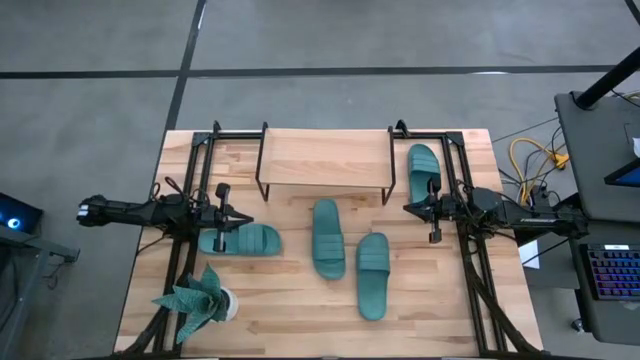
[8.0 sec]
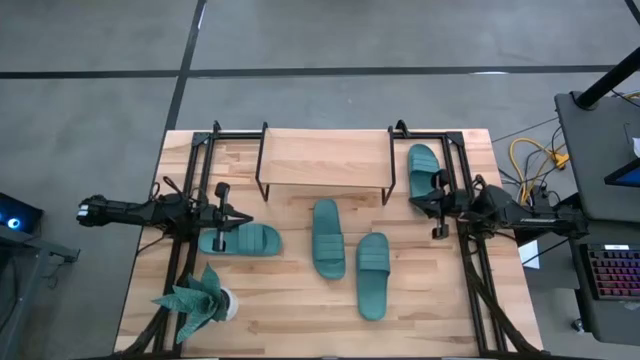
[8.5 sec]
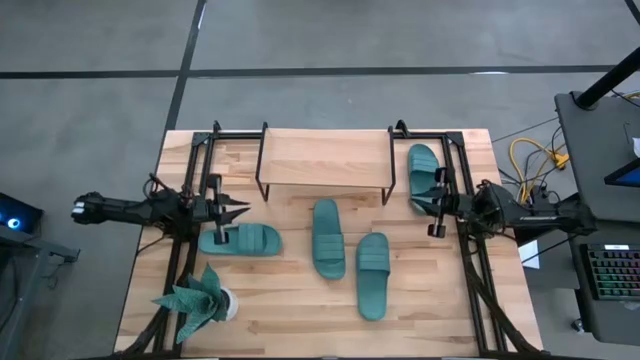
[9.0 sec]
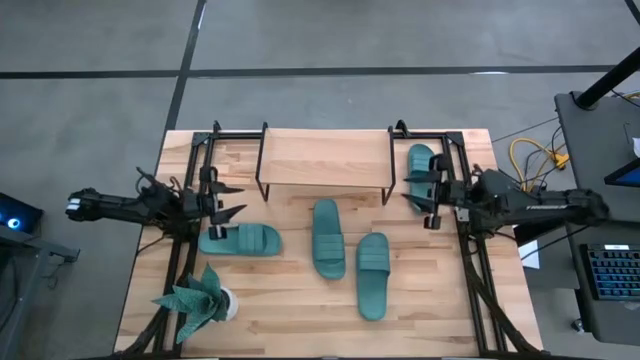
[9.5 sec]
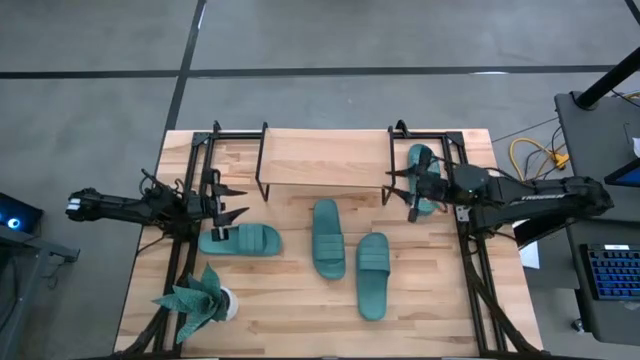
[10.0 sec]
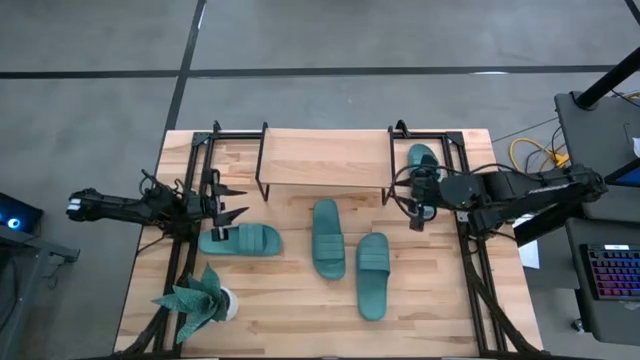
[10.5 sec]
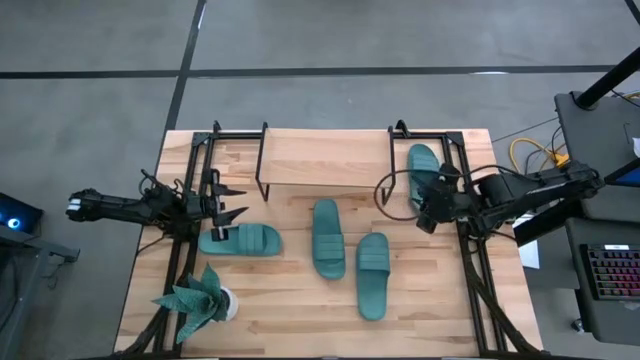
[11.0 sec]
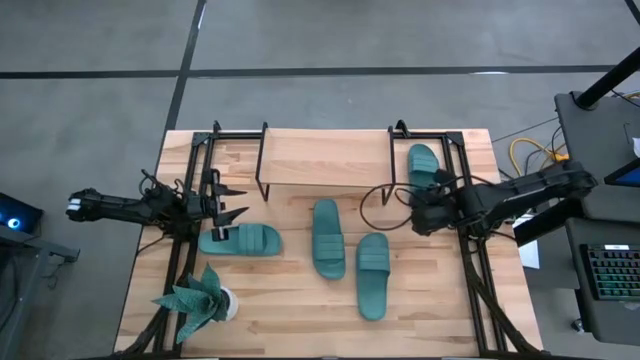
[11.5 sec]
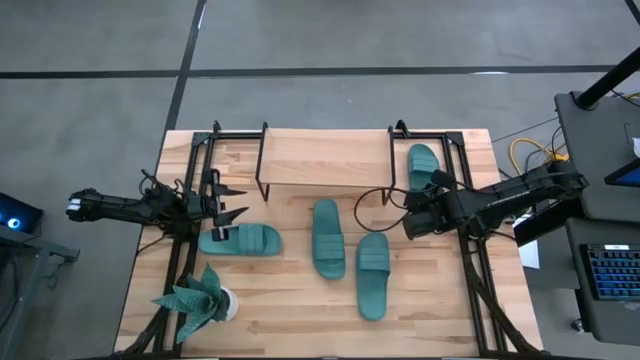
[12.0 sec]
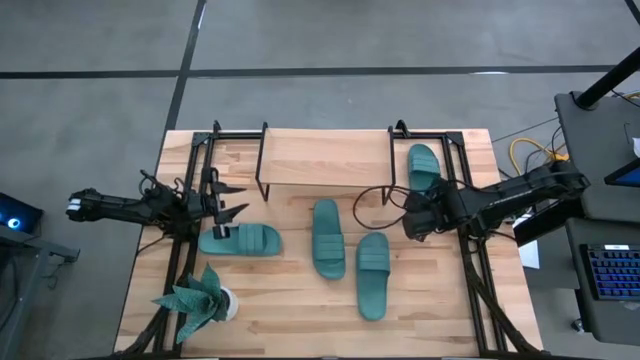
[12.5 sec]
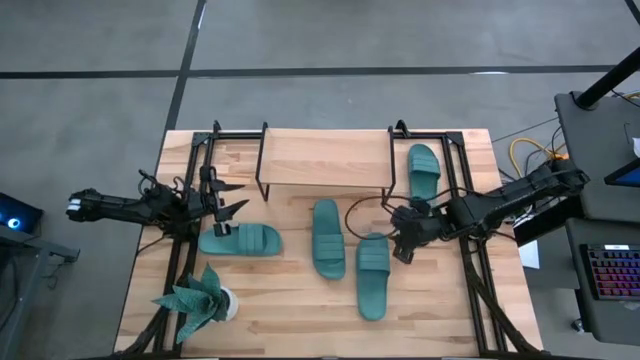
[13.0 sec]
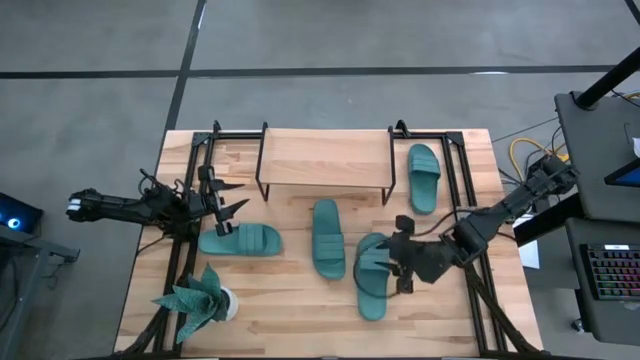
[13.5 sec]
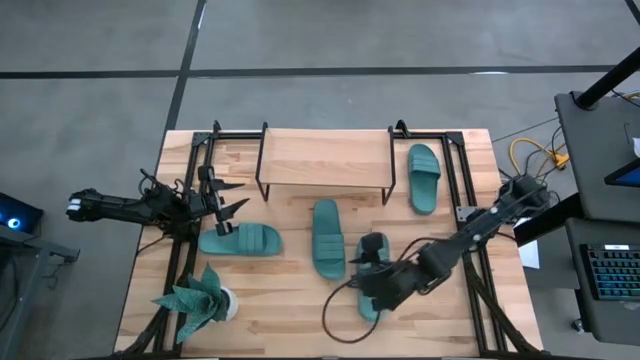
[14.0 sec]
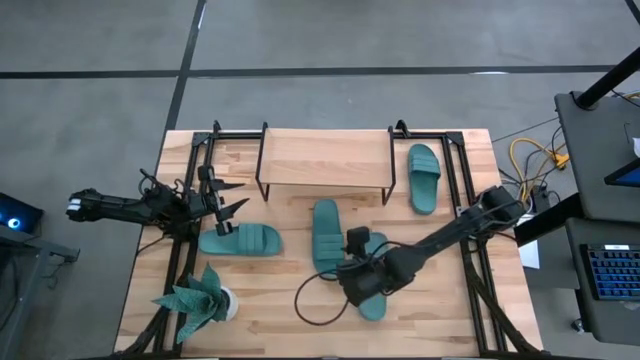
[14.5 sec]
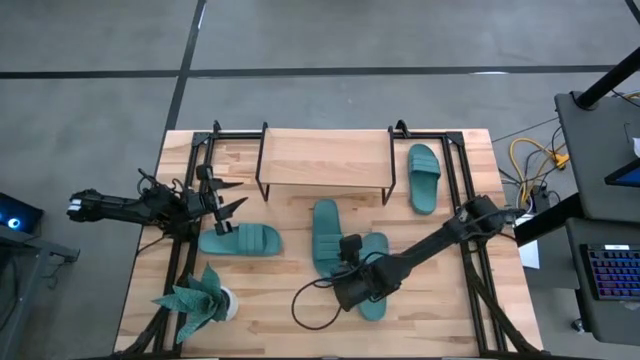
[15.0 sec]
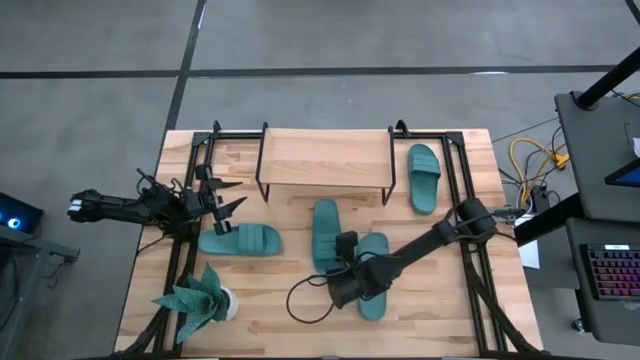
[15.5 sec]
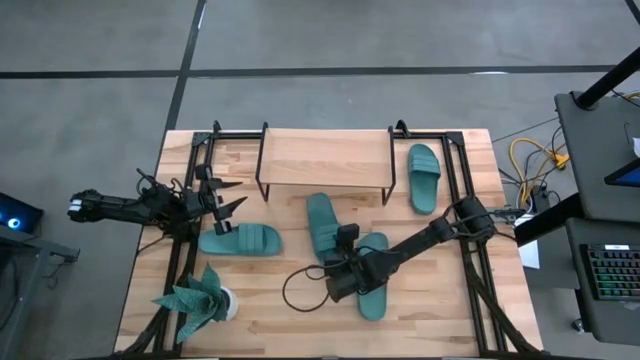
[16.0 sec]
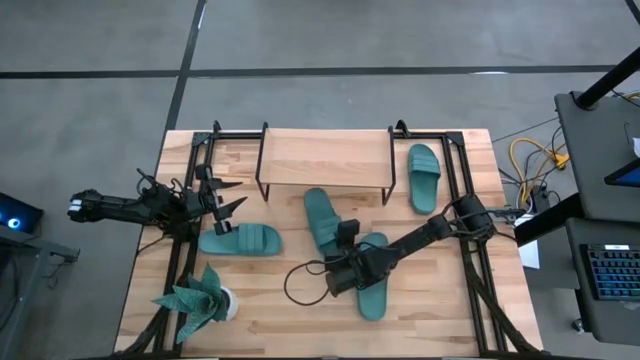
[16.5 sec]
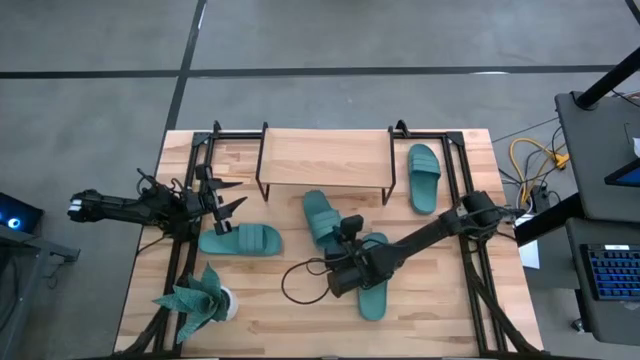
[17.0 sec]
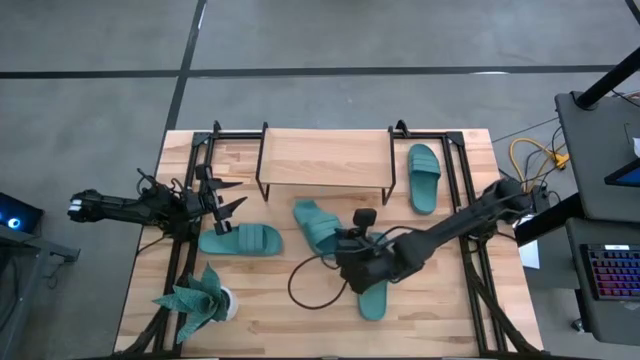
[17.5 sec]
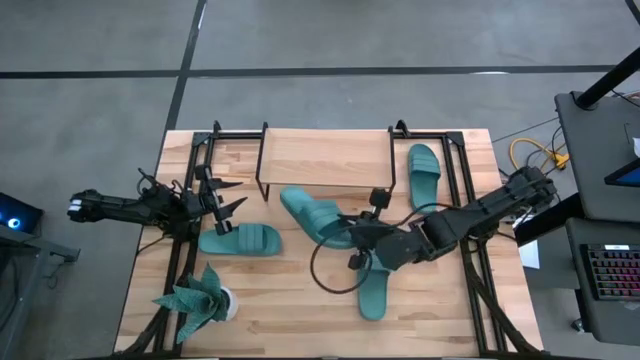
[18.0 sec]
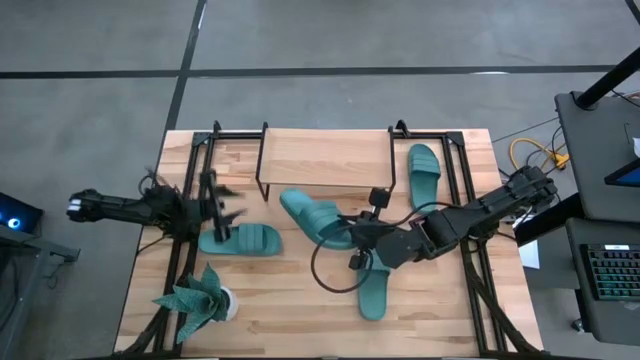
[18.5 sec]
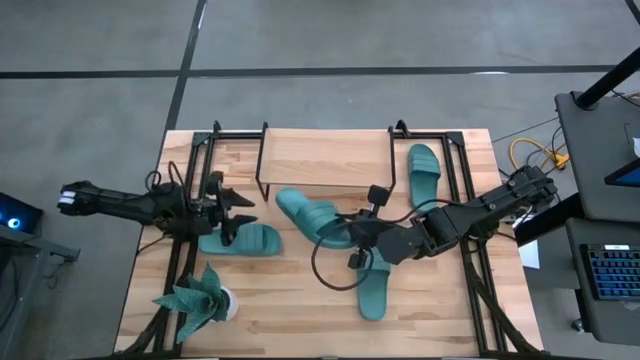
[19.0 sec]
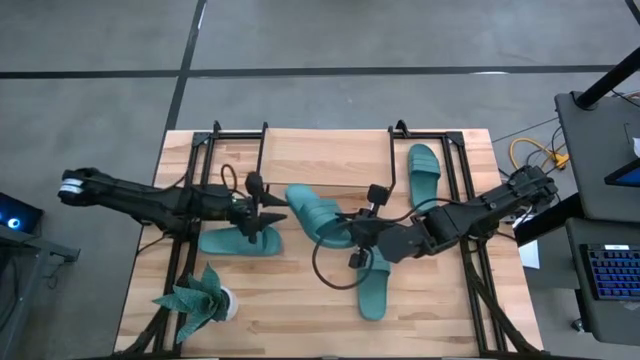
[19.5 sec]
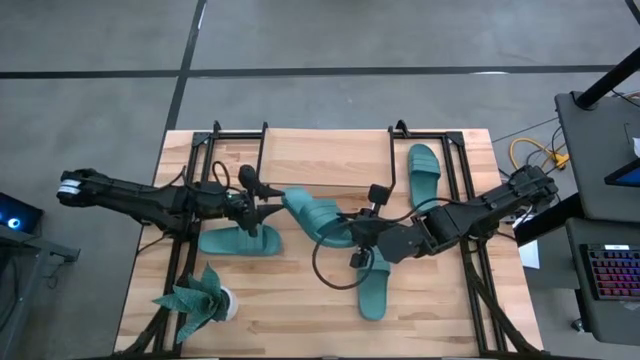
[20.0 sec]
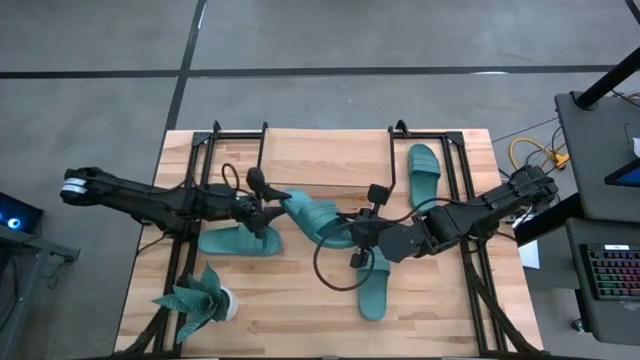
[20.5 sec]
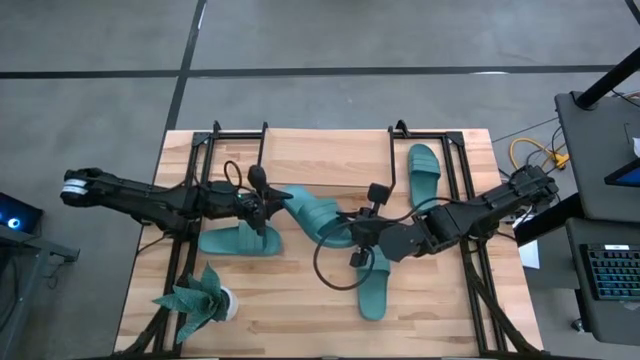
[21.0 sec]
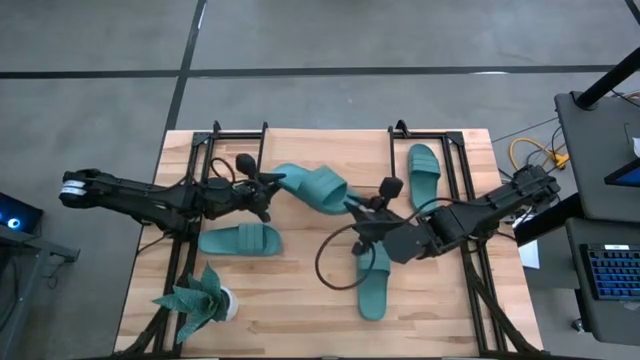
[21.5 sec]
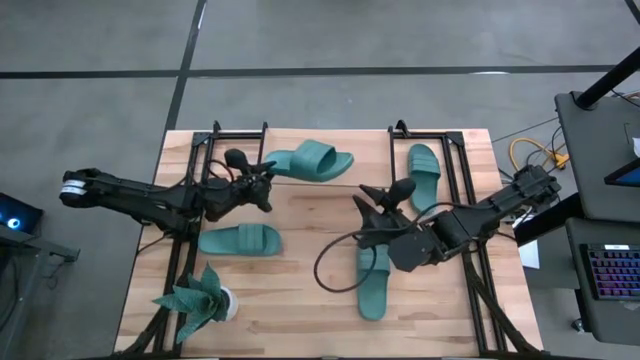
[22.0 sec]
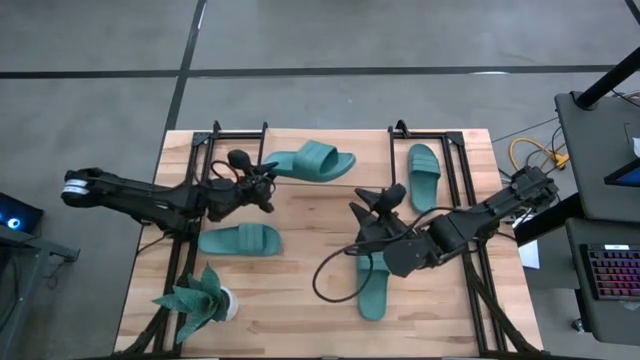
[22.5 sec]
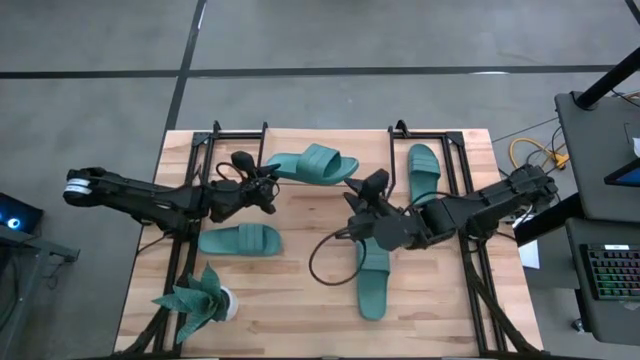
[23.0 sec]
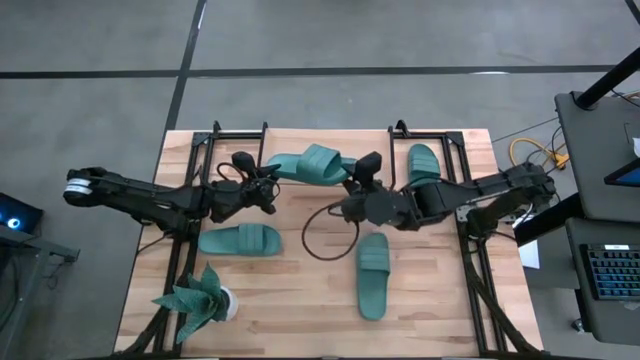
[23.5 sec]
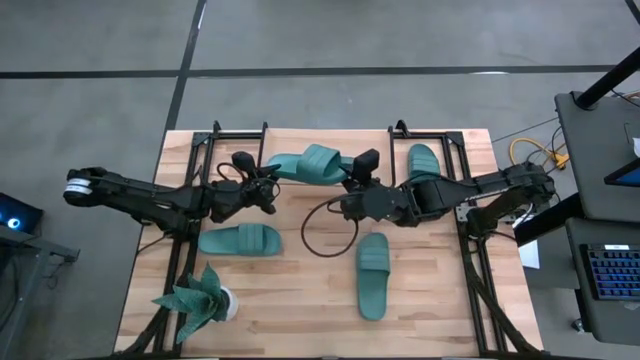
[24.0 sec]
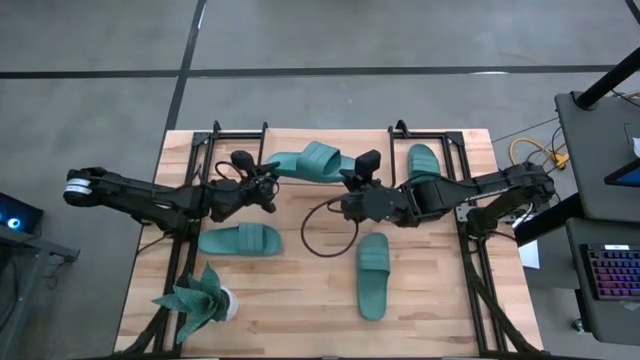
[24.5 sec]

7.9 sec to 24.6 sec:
Task: Pick and place slides into the shelf
Put the green slide on the shelf

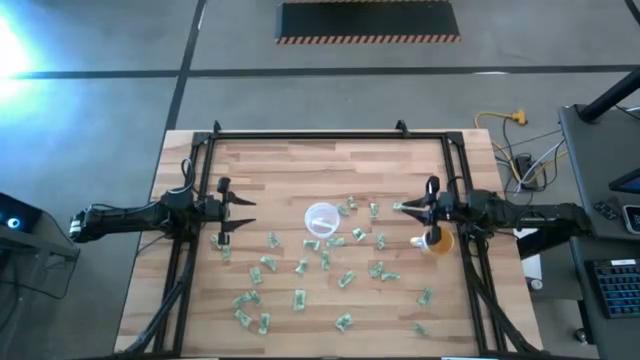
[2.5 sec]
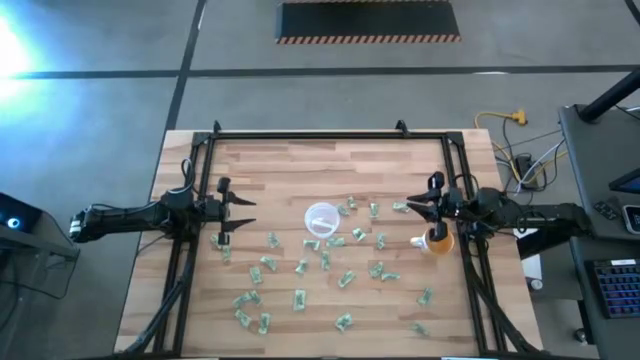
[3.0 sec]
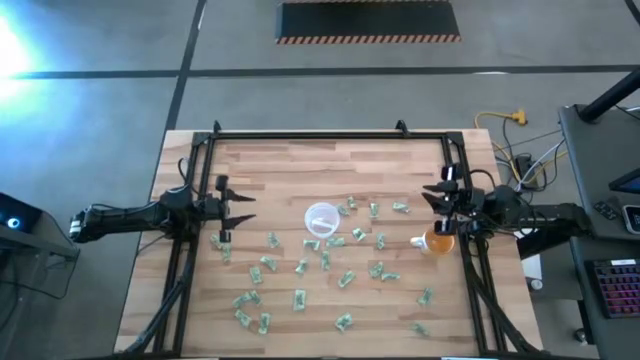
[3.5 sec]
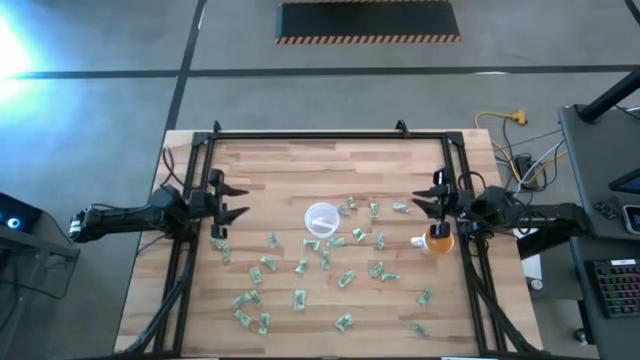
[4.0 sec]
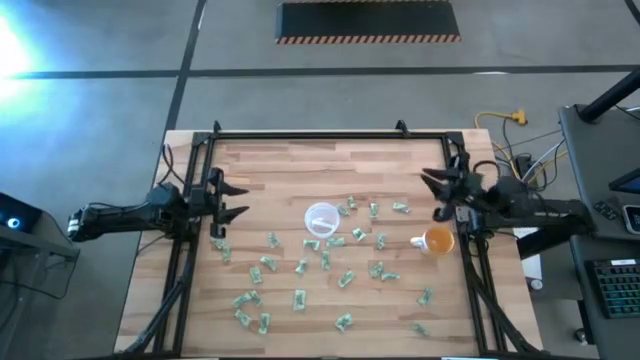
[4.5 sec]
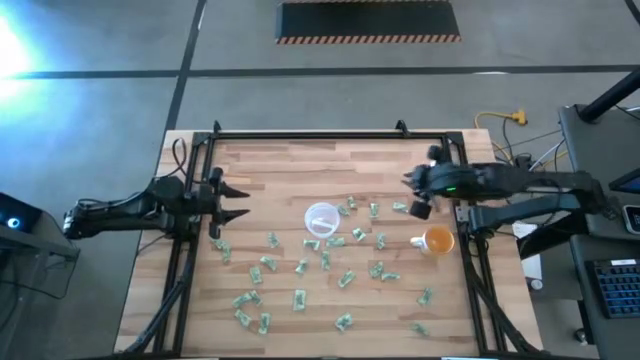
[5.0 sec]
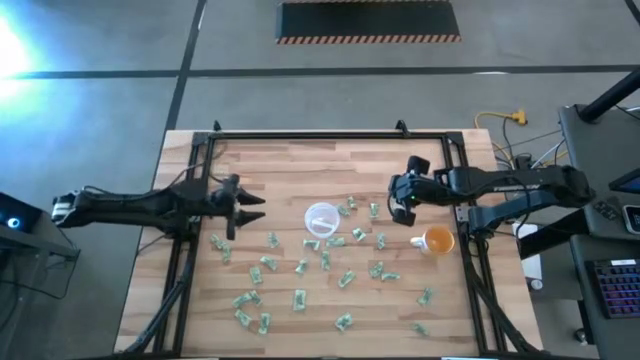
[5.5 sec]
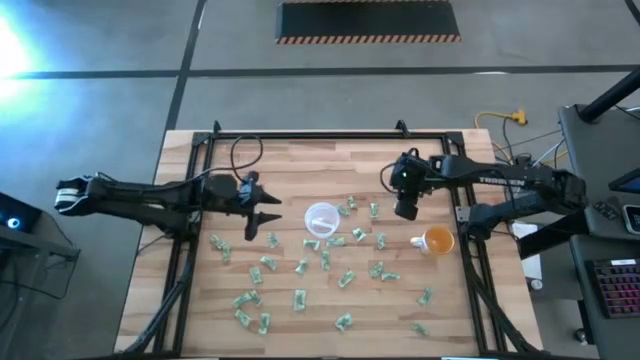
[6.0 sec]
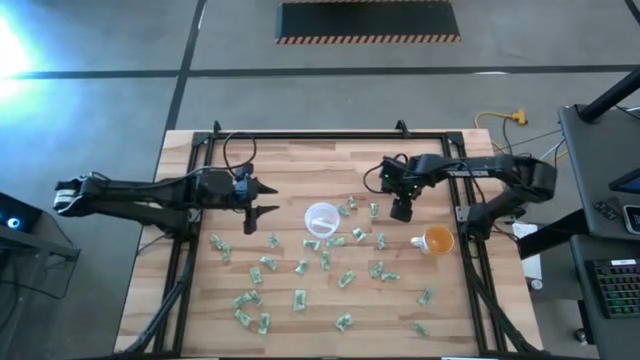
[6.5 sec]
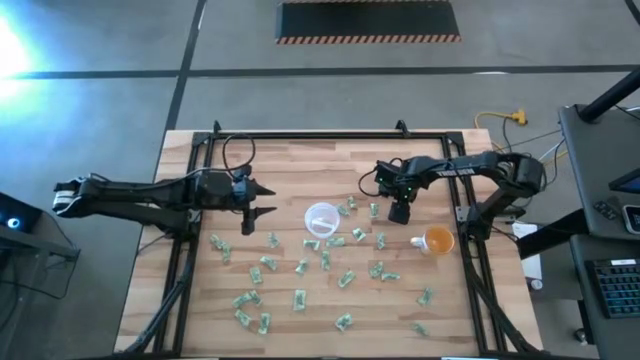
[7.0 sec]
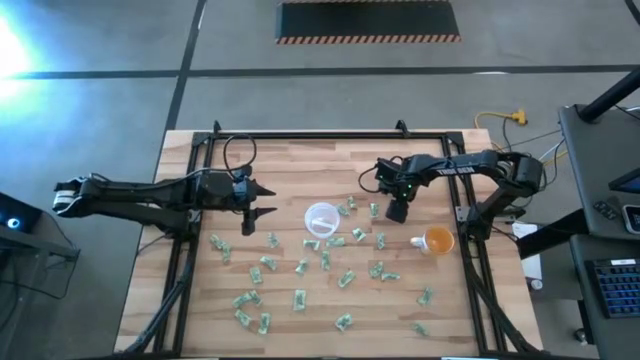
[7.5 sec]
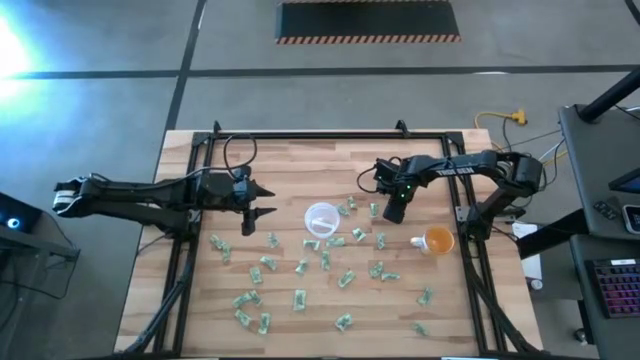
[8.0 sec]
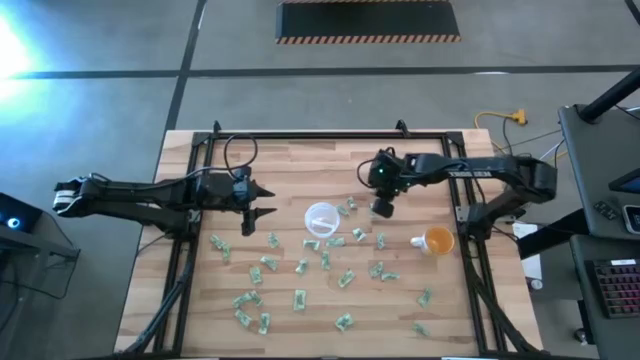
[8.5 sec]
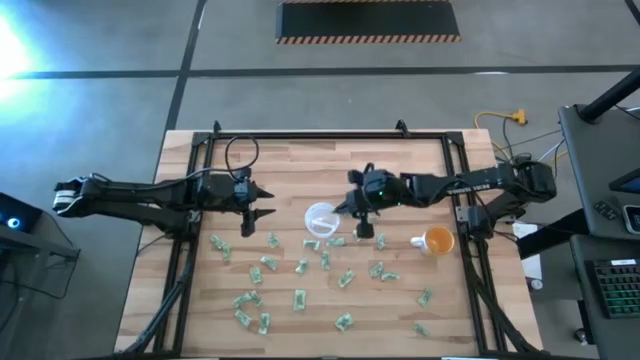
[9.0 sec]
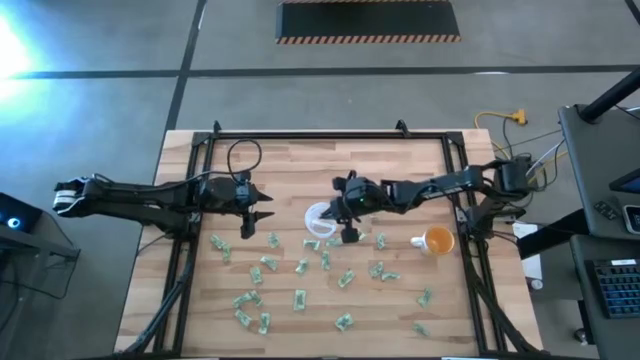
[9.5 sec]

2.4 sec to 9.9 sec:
Task: Pick and place Stevia / Truvia into bins
Put the light green stevia packet into the transparent container
